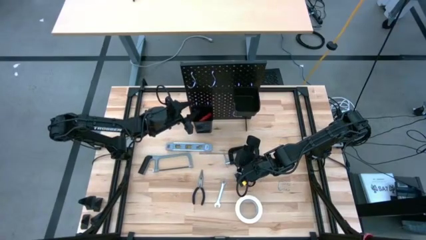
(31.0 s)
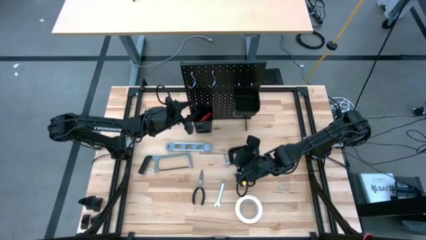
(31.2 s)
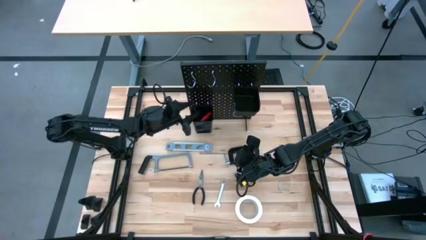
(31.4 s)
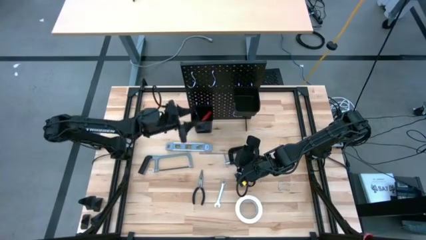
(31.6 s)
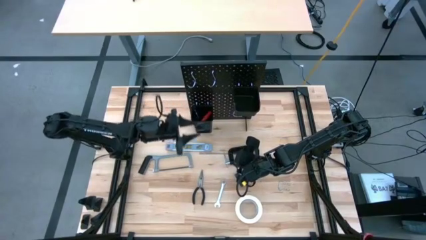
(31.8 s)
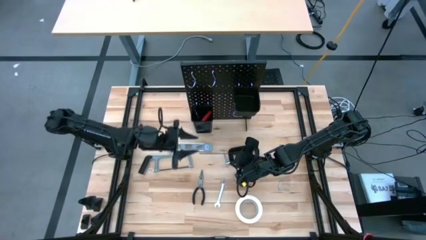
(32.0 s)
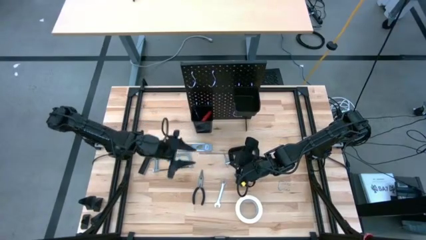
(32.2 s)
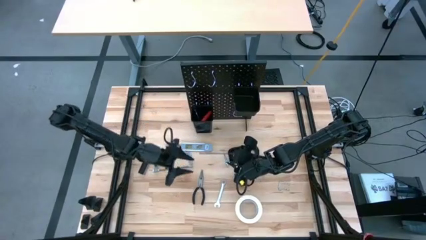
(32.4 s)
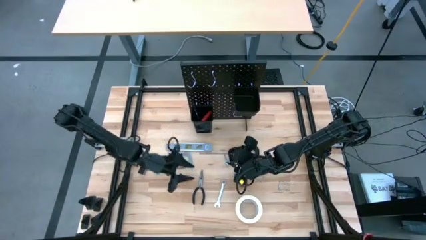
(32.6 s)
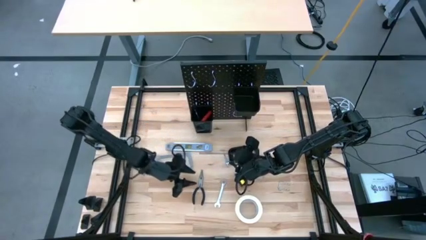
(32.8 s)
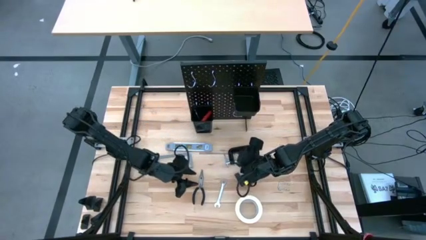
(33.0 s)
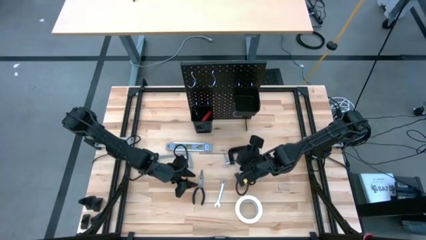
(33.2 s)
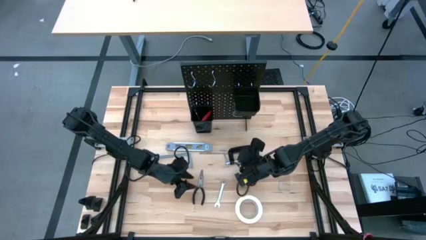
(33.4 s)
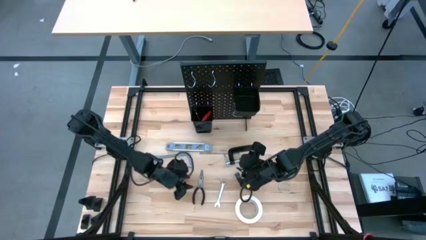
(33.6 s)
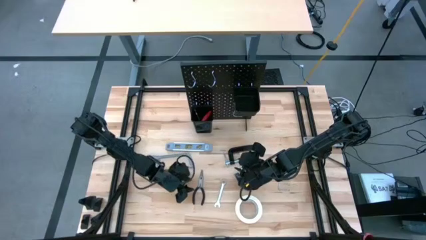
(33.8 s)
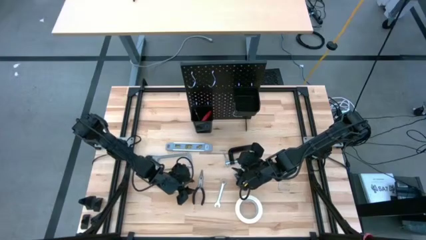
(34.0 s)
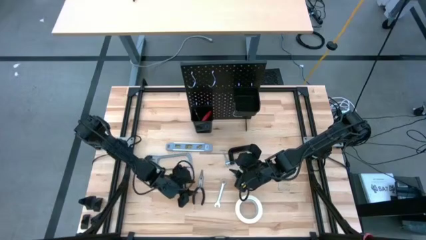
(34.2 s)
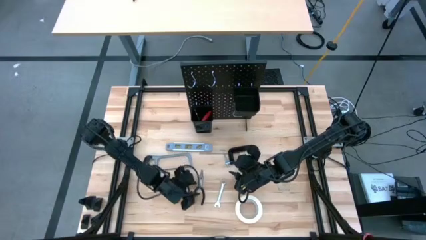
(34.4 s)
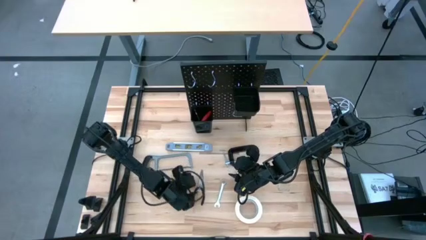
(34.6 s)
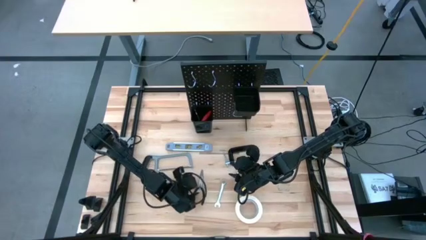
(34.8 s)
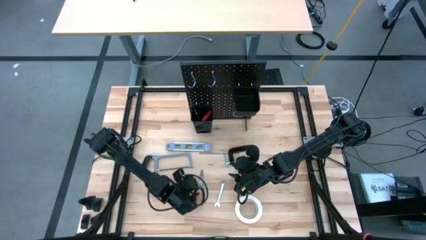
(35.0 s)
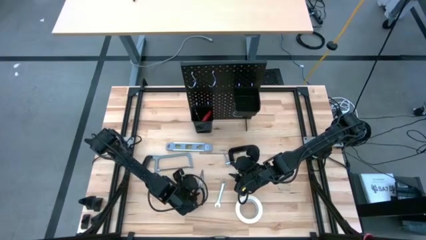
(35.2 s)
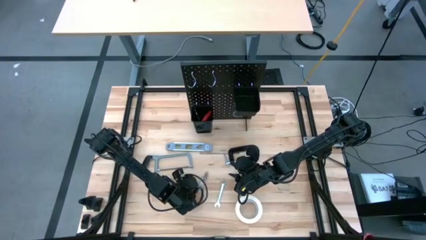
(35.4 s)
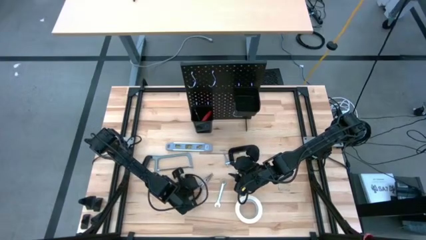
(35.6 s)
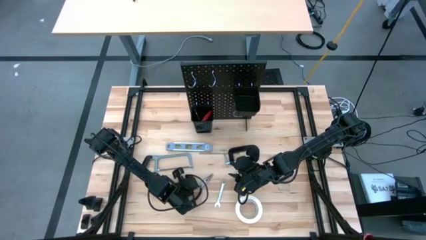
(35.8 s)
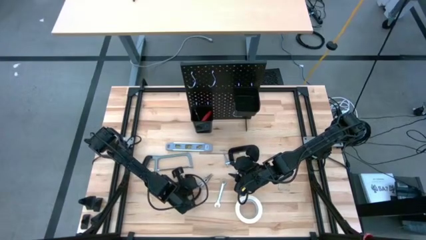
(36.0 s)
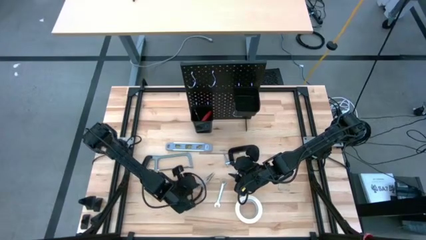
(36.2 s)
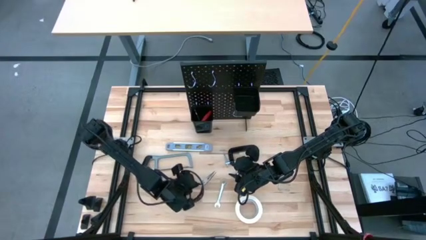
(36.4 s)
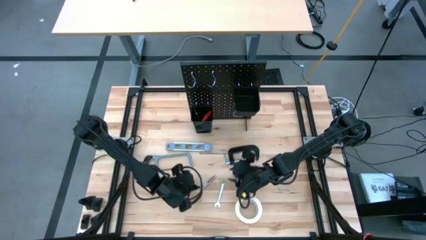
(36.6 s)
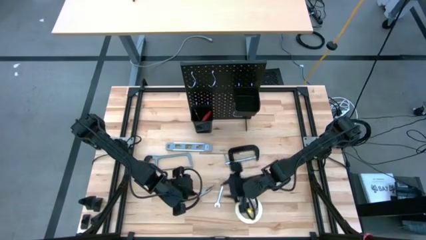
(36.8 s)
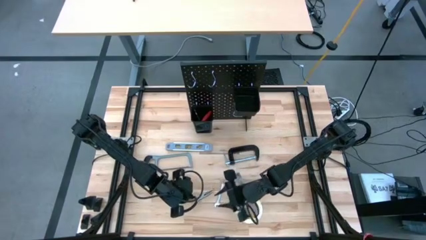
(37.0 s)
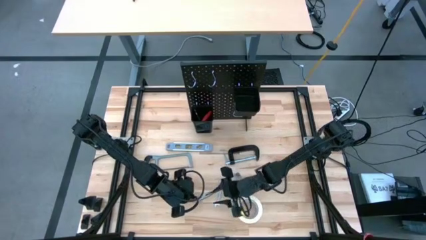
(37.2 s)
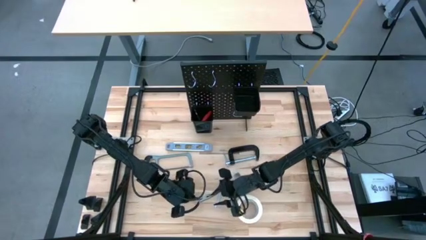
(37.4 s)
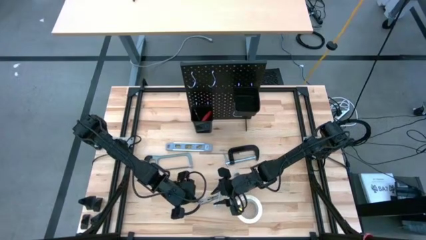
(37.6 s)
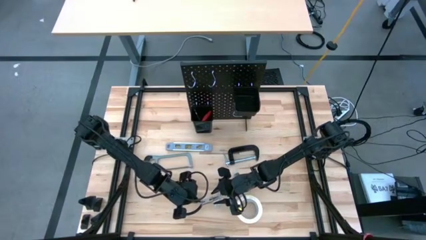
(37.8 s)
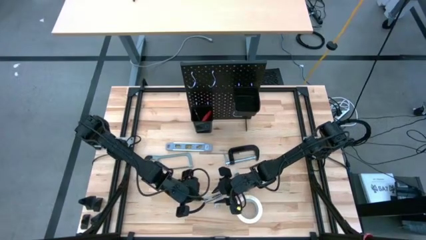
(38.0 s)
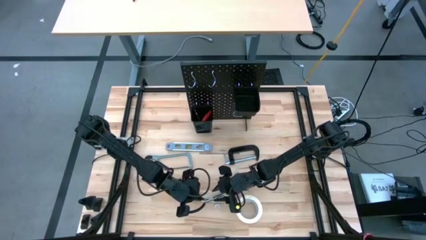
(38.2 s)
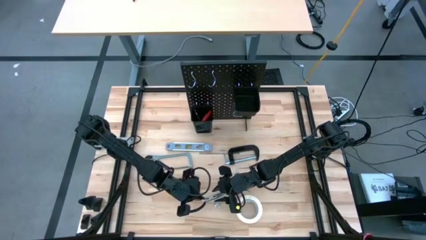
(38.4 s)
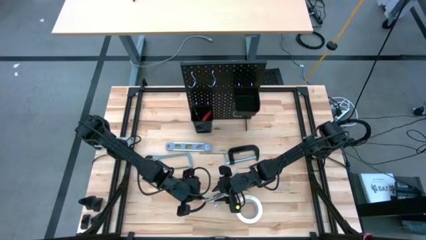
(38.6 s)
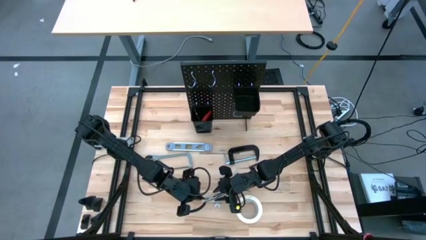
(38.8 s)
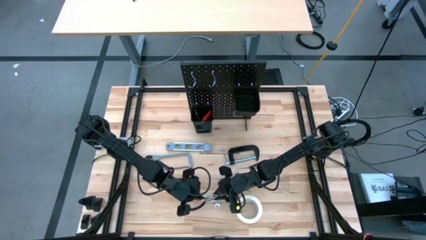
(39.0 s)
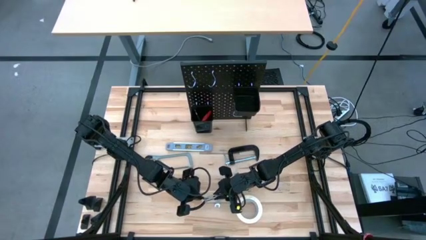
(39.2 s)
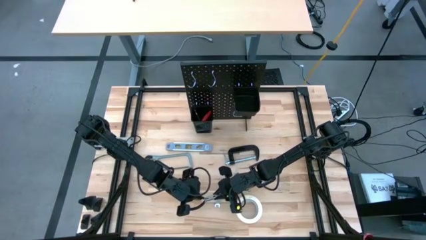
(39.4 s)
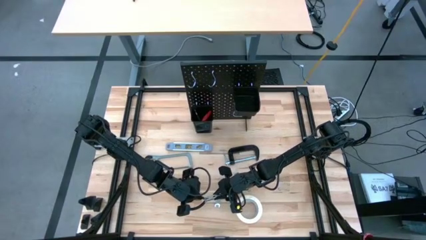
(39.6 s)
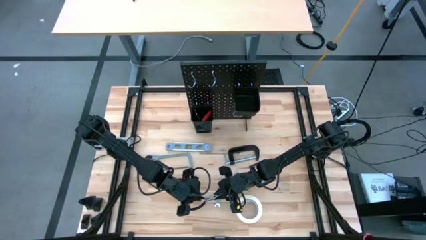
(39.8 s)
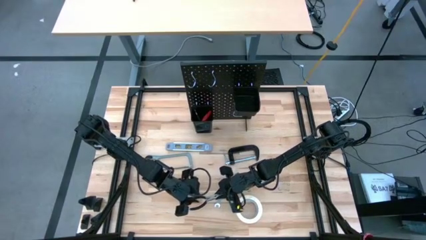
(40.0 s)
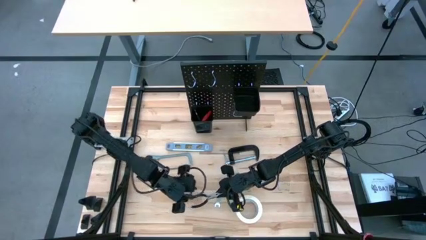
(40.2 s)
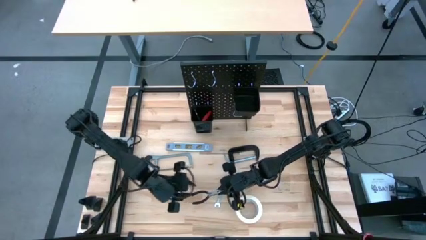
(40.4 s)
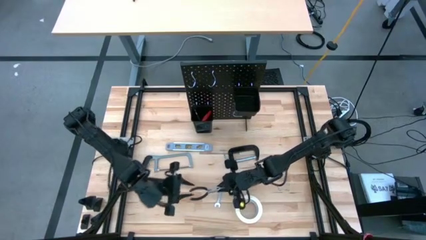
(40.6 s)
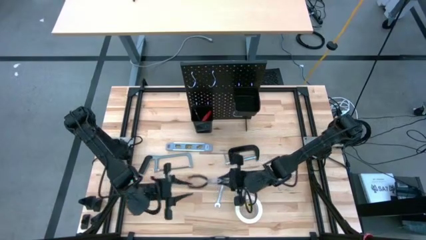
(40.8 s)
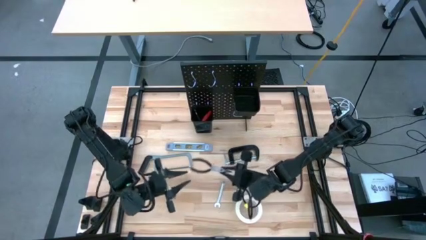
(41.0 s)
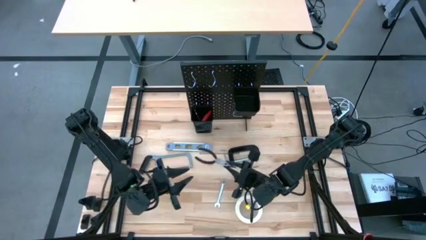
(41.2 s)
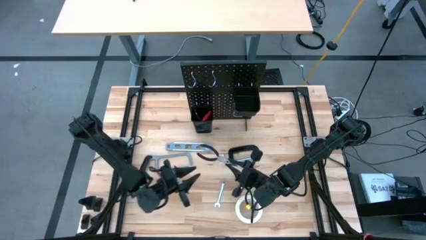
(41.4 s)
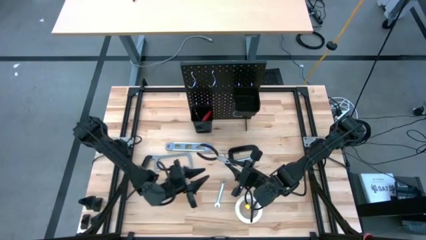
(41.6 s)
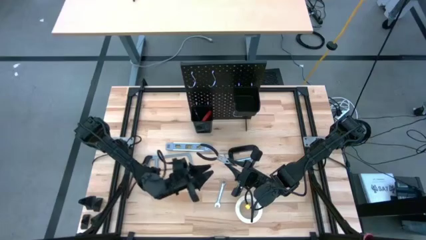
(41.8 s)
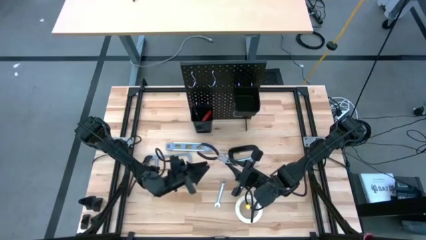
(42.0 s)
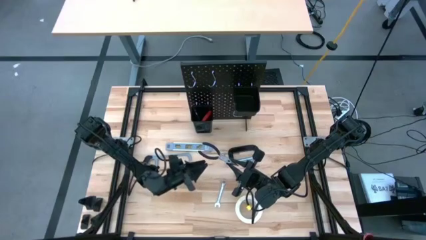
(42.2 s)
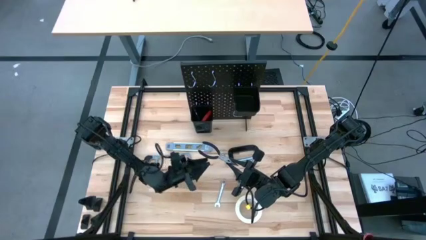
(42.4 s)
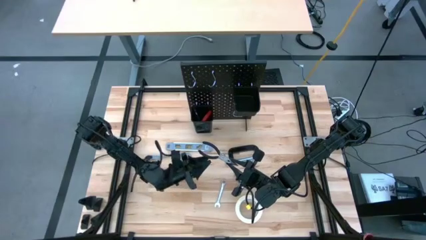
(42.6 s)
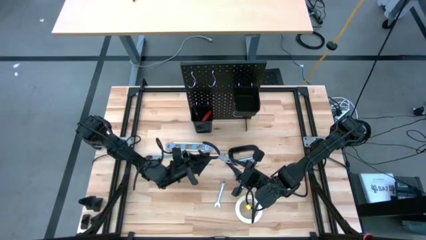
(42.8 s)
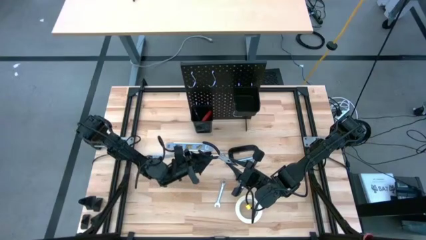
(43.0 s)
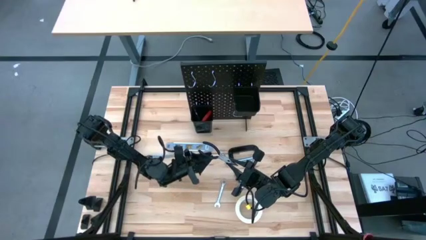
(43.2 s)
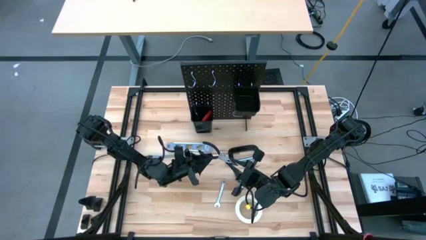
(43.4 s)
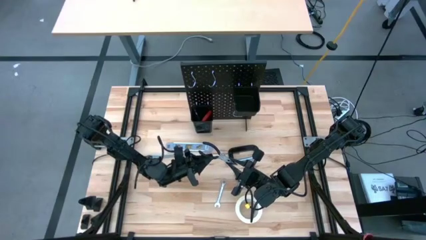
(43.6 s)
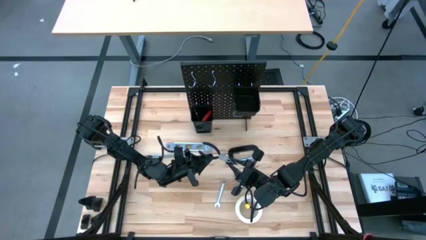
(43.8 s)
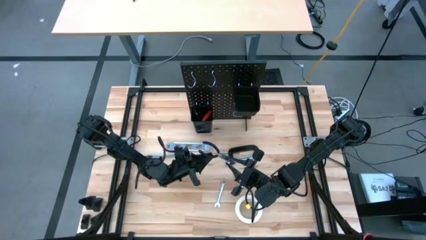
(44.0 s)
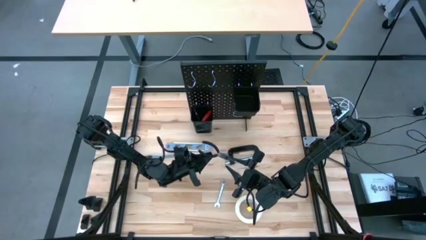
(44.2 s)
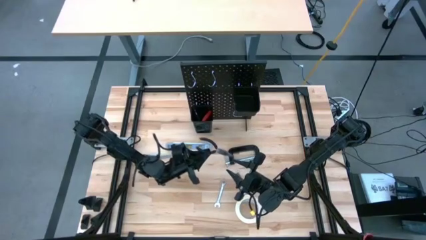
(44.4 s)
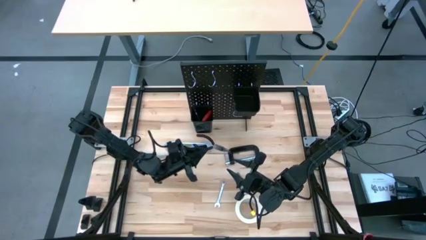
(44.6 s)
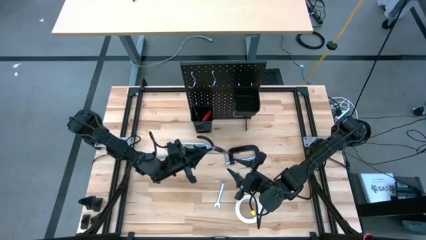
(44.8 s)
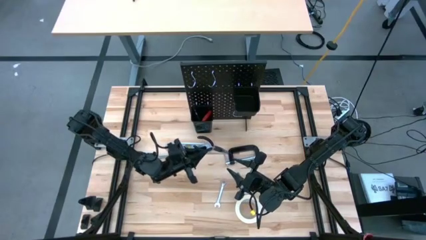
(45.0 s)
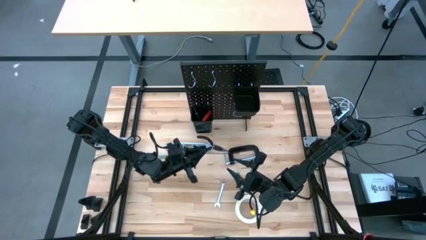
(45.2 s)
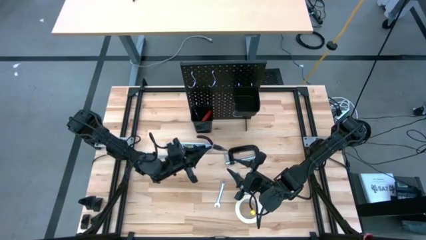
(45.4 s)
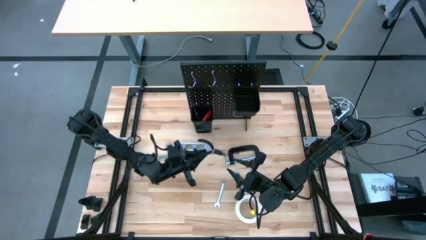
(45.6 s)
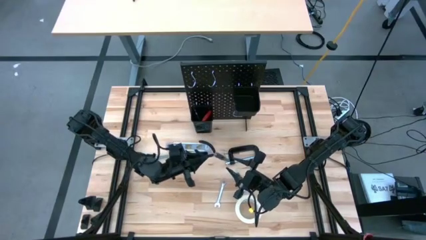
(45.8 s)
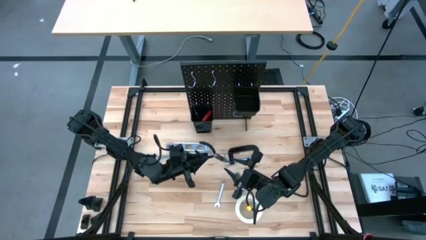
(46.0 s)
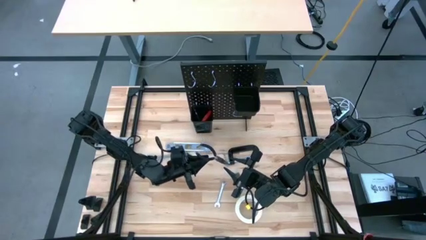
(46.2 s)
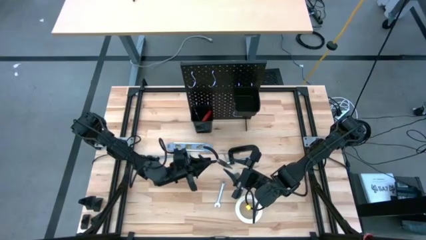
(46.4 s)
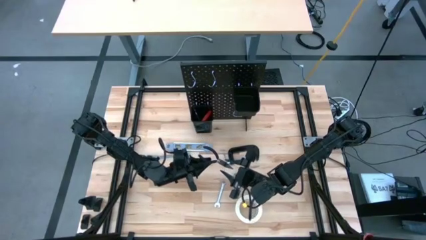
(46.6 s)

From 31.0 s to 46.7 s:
Task: Hang tools onto peg board
Put the long nose pliers into the bottom black bin on the pegboard
